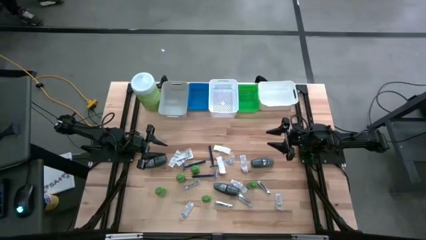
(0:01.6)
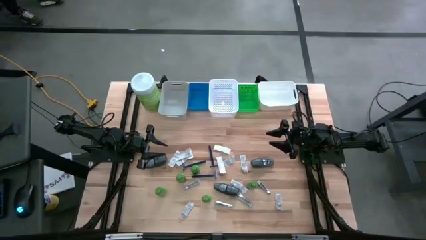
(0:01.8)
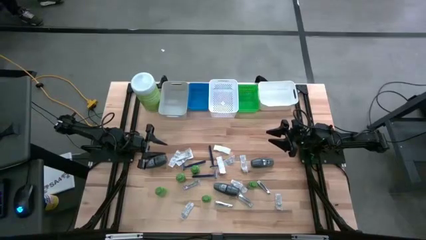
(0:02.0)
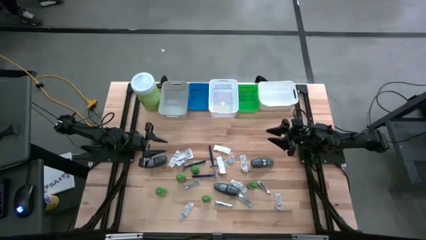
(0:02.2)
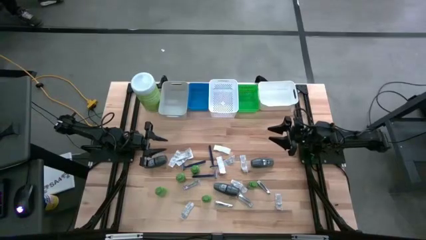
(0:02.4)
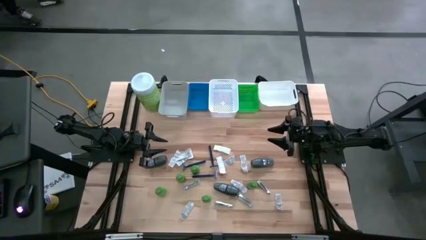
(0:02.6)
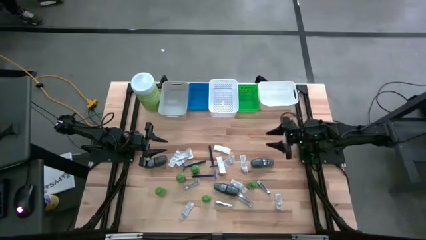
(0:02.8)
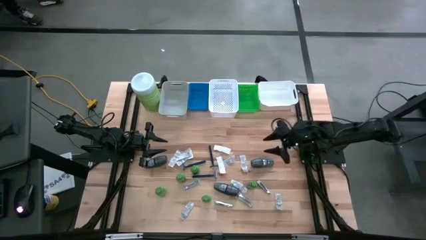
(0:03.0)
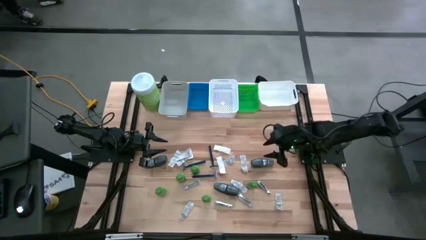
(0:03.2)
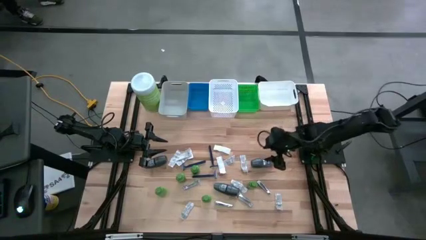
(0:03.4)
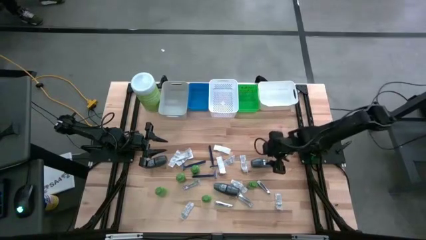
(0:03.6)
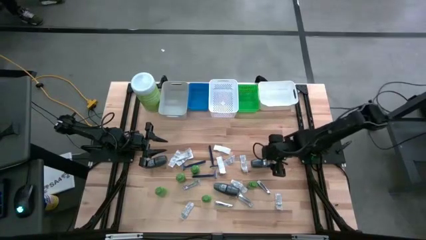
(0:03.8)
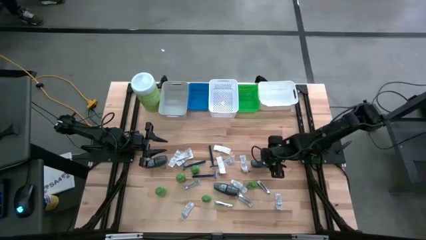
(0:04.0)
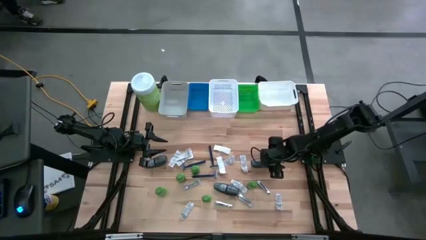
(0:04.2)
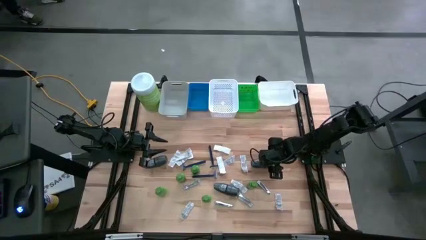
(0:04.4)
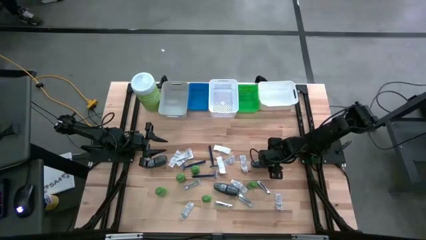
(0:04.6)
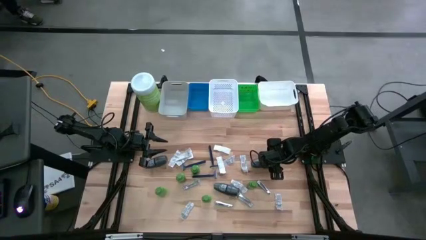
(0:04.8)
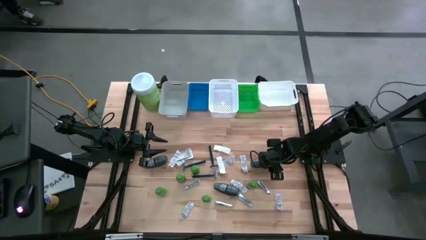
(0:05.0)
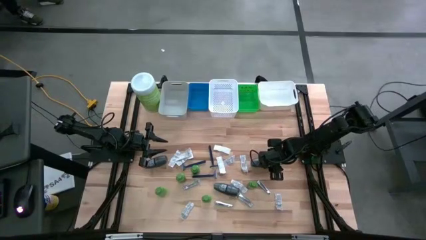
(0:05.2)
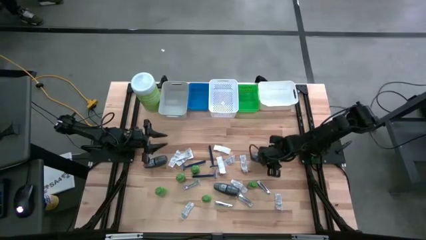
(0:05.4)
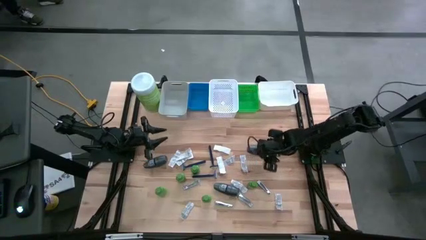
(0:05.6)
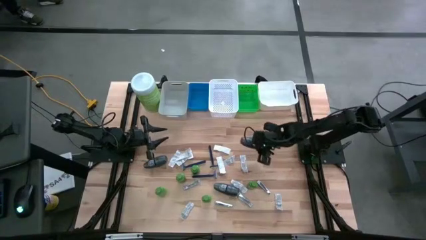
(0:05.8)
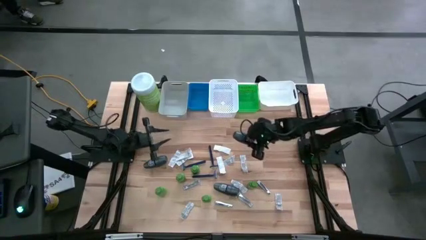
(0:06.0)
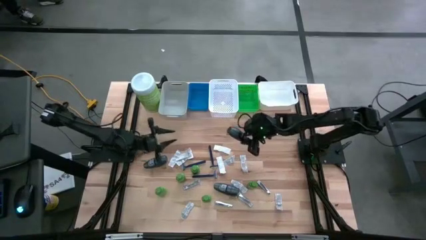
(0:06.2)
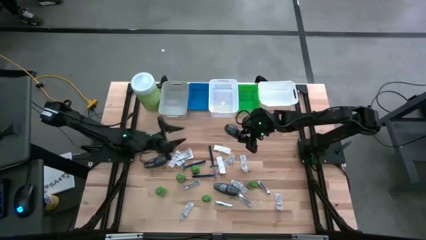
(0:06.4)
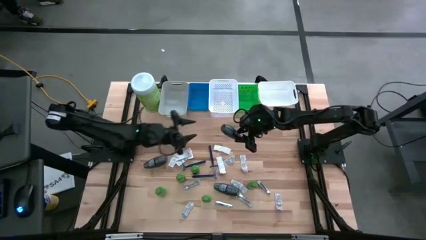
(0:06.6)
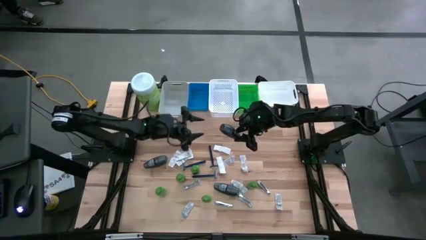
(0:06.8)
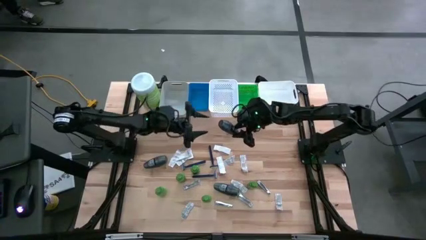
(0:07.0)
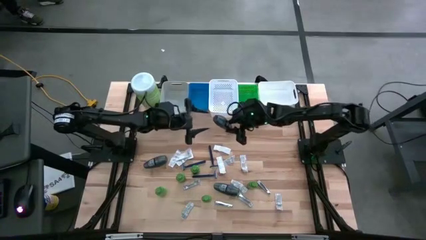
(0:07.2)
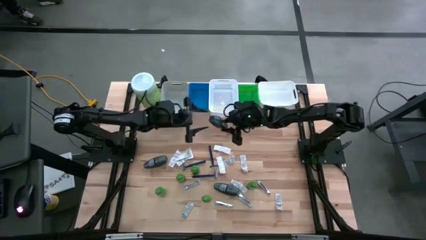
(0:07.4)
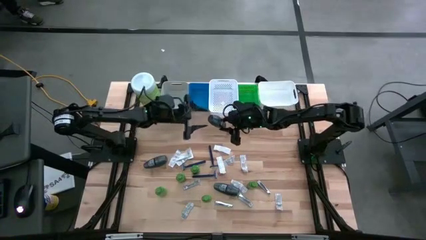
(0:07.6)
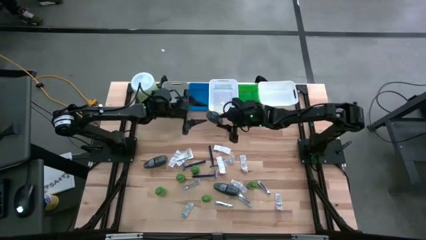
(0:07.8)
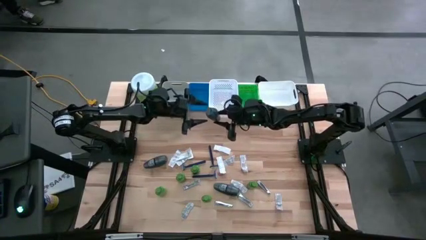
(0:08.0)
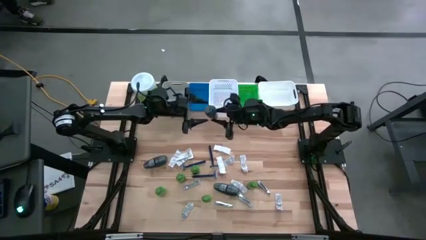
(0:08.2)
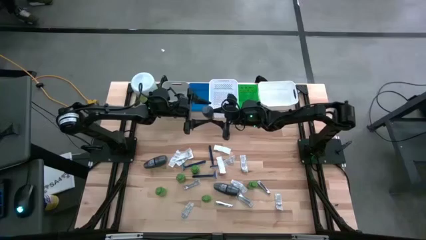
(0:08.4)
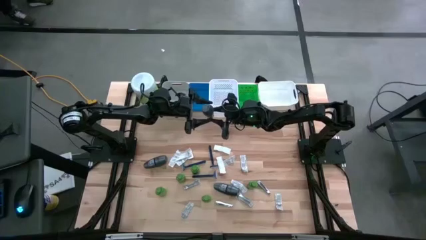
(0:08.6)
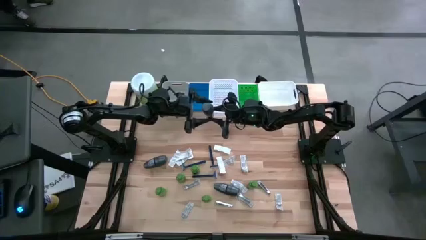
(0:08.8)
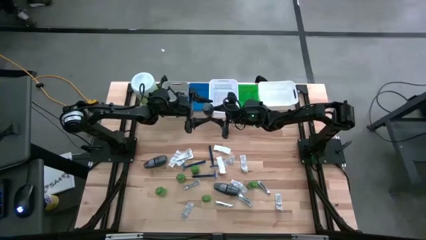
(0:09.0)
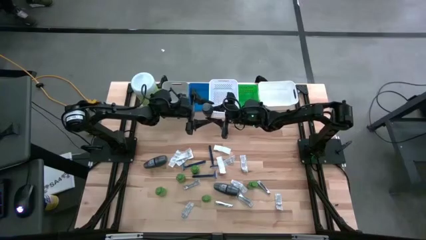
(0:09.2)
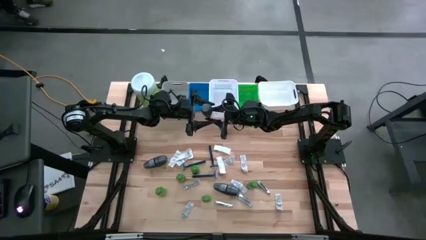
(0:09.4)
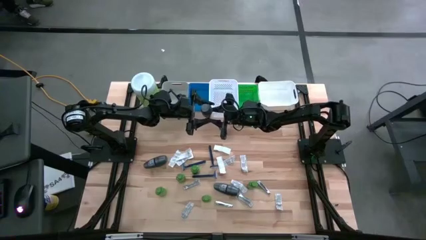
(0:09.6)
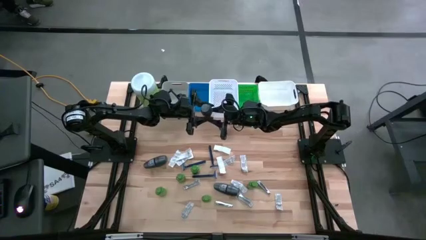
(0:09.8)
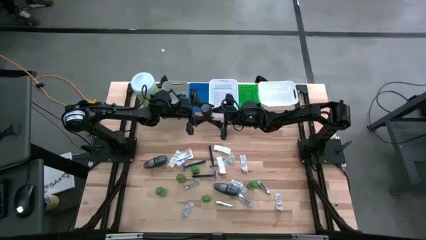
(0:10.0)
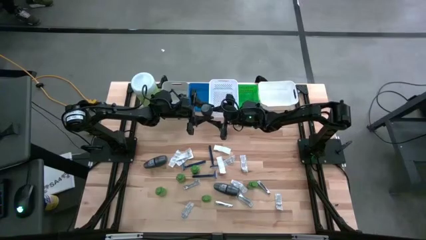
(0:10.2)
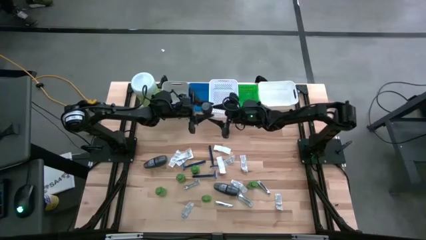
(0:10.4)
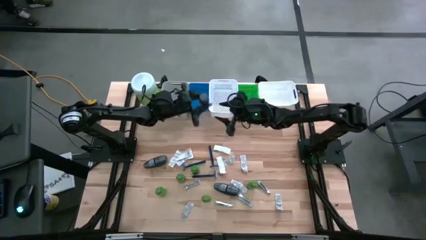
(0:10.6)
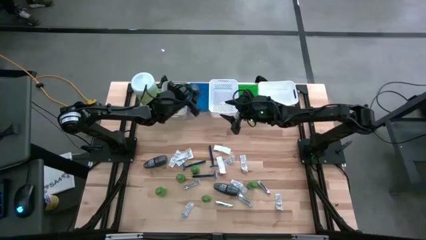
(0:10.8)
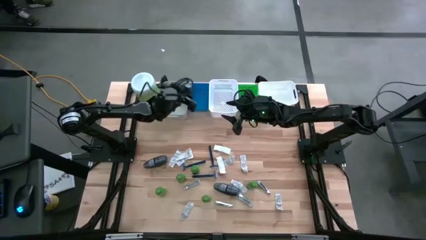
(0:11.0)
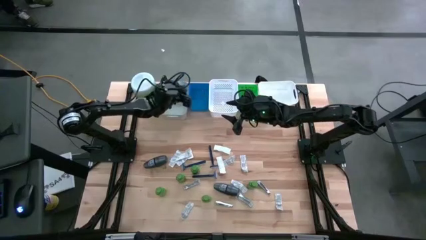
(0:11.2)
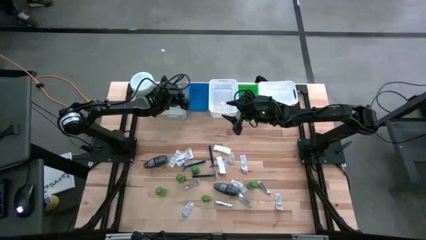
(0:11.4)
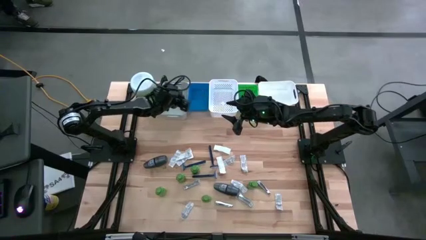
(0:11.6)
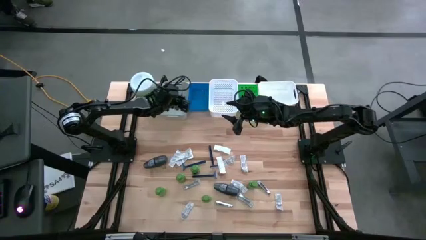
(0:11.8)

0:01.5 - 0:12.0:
Task: Pick & Place Travel size toiletries
Put the top right gray deodorant into the gray bin

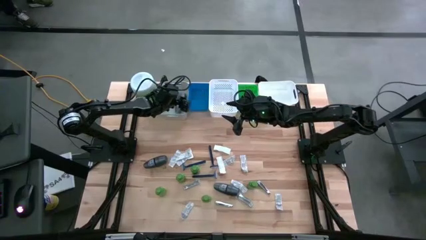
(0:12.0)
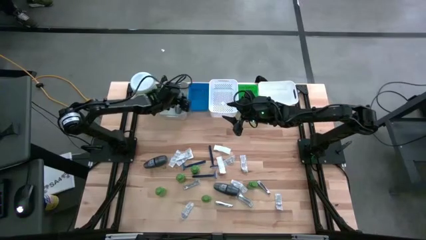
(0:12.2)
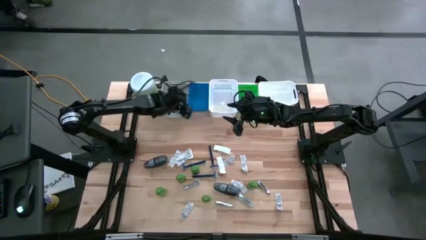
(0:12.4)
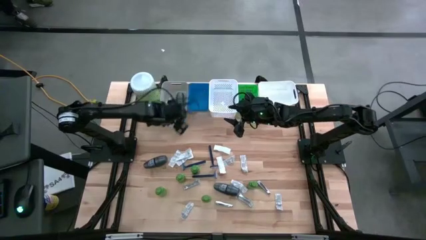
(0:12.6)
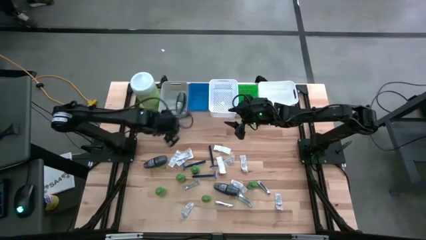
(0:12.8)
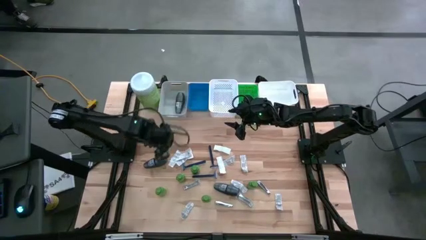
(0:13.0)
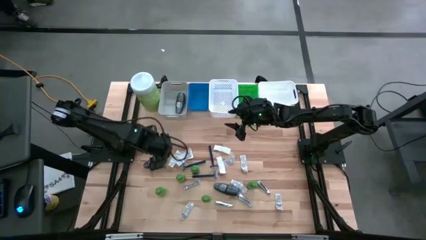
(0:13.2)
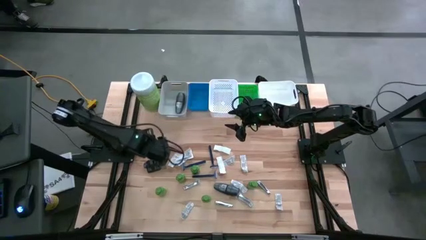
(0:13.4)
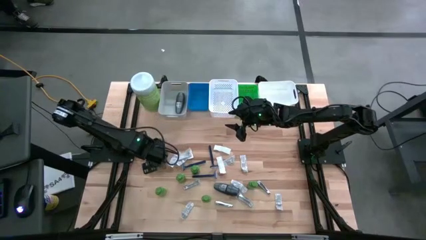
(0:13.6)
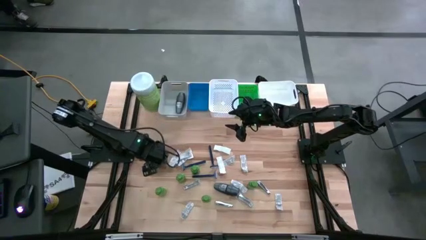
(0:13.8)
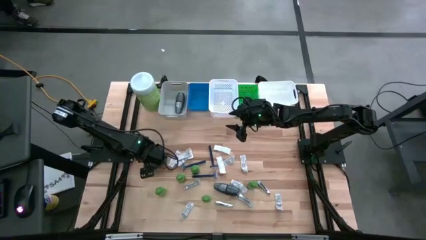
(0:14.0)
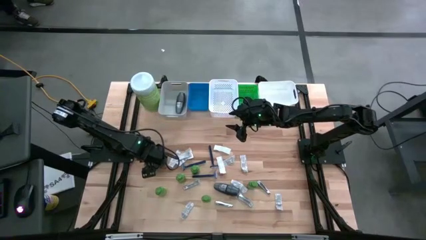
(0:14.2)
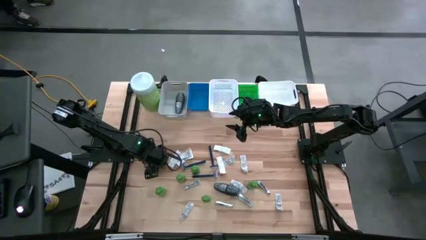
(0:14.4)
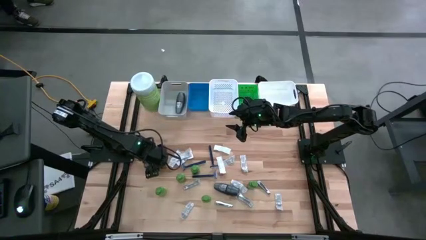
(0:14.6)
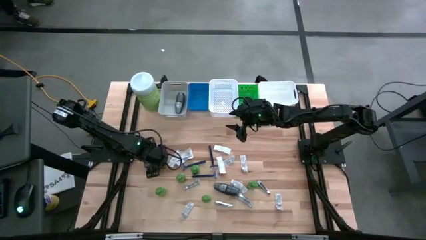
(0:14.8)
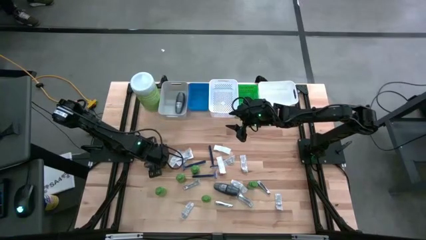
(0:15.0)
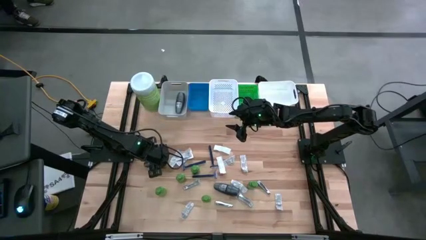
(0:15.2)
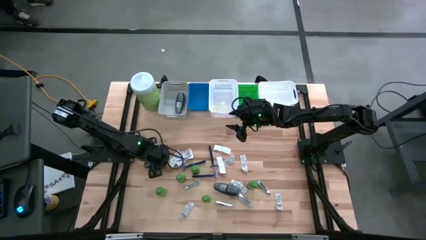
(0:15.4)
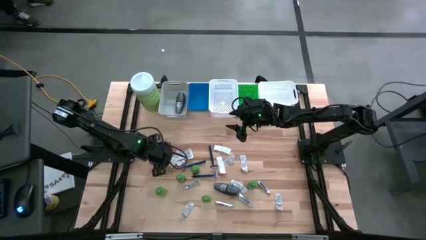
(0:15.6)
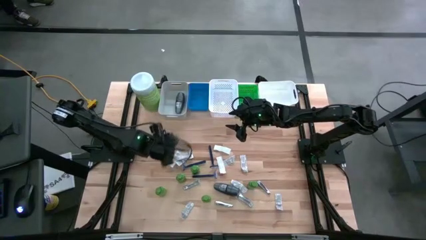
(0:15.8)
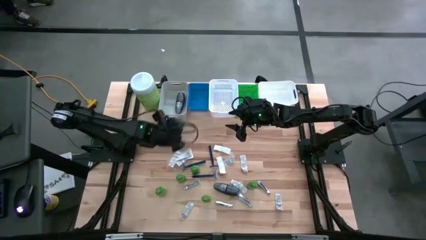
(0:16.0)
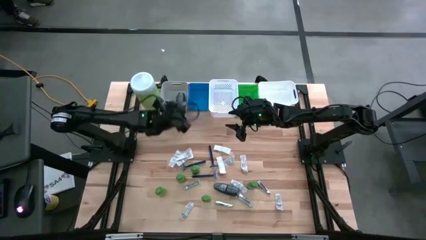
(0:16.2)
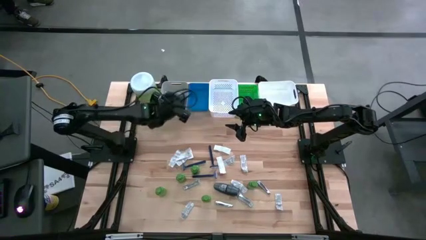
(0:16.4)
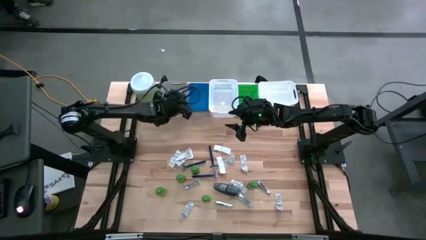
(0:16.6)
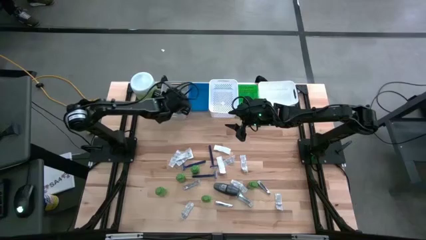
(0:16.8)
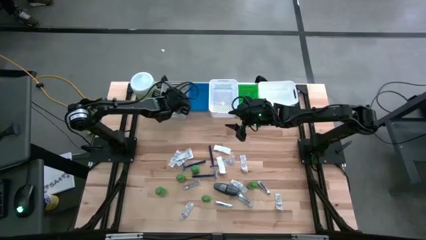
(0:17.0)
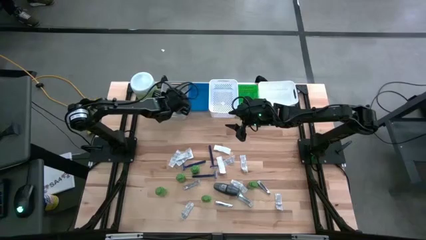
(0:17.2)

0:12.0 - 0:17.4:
Put the top gray deodorant into the gray bin
